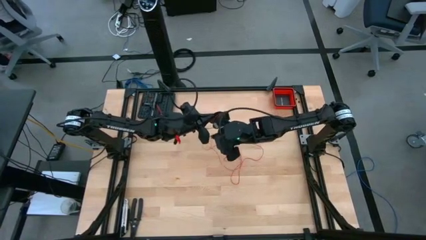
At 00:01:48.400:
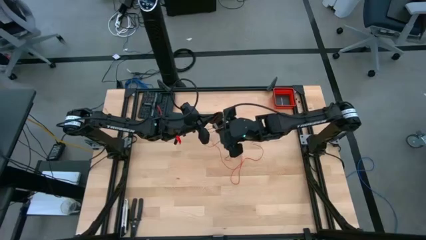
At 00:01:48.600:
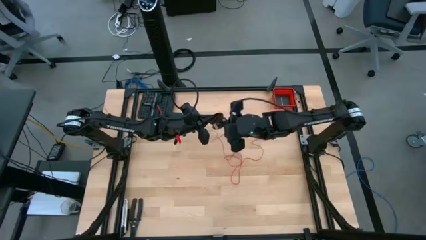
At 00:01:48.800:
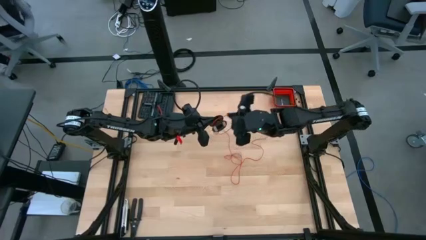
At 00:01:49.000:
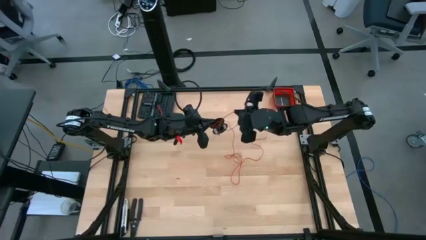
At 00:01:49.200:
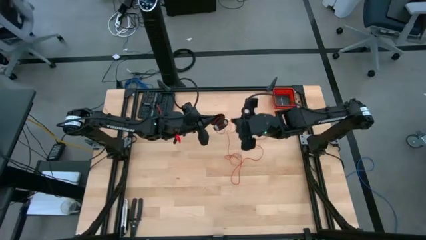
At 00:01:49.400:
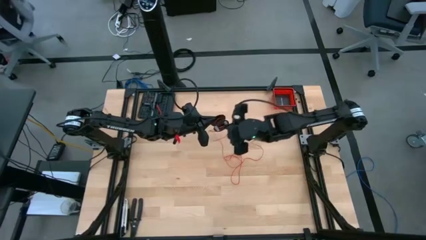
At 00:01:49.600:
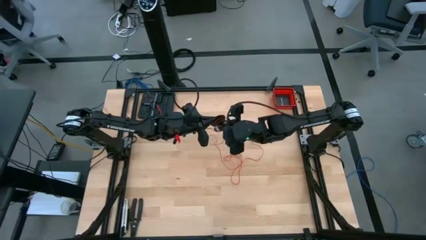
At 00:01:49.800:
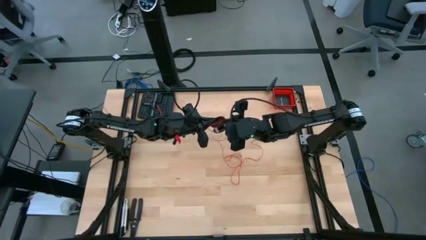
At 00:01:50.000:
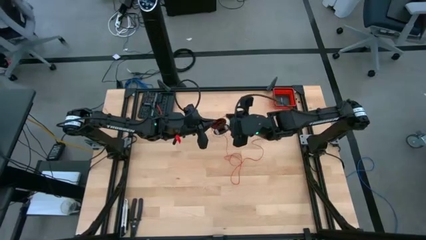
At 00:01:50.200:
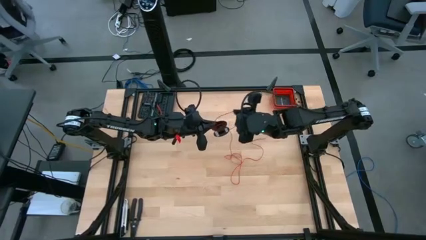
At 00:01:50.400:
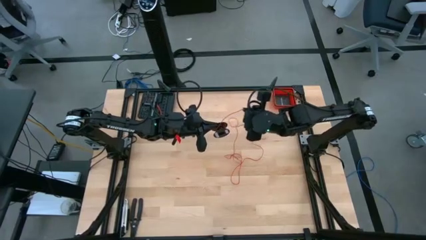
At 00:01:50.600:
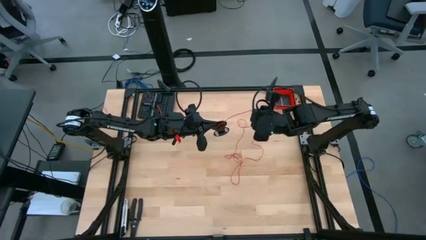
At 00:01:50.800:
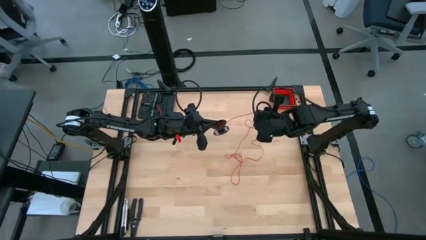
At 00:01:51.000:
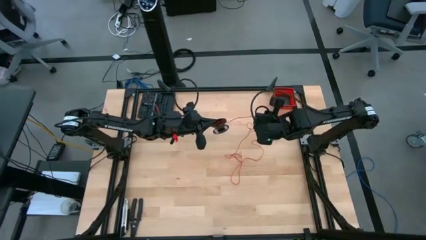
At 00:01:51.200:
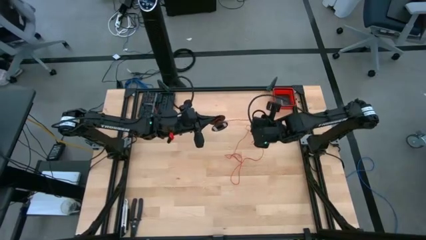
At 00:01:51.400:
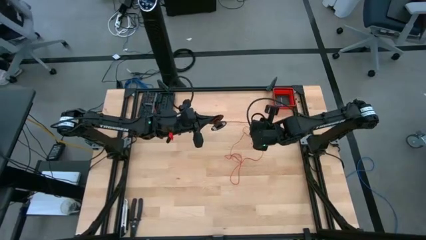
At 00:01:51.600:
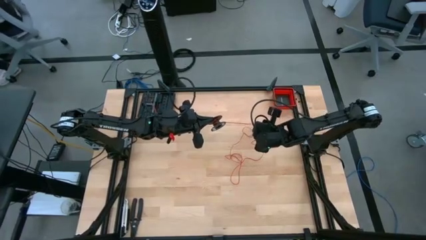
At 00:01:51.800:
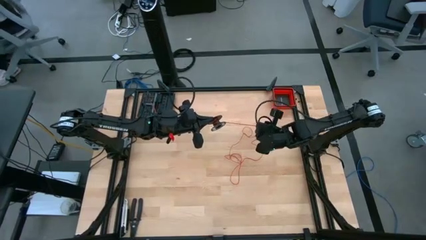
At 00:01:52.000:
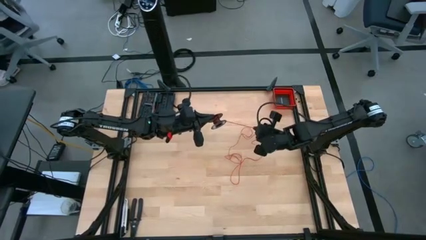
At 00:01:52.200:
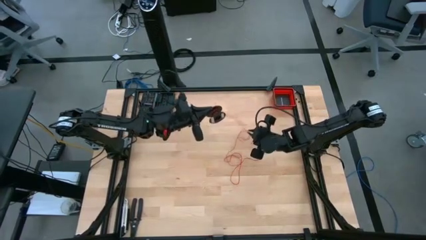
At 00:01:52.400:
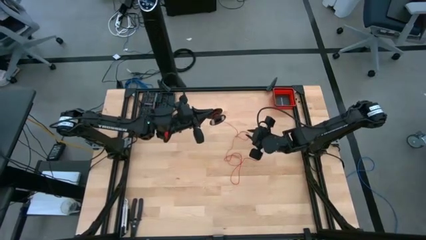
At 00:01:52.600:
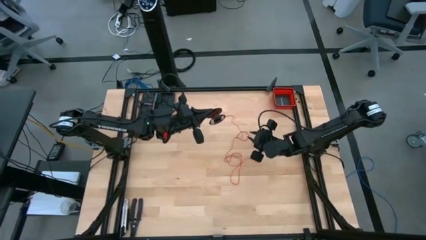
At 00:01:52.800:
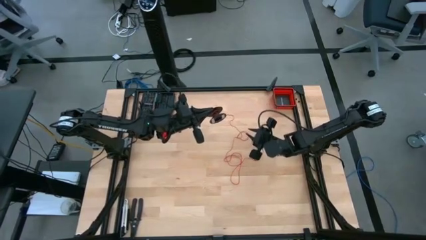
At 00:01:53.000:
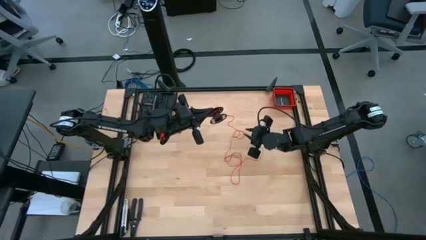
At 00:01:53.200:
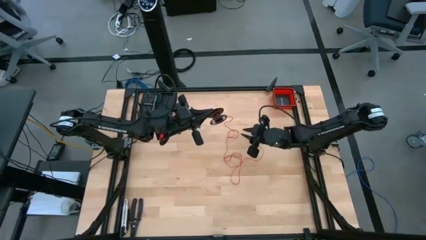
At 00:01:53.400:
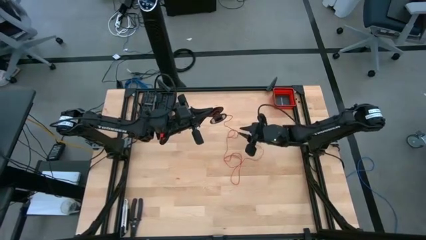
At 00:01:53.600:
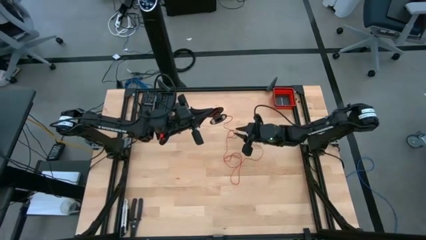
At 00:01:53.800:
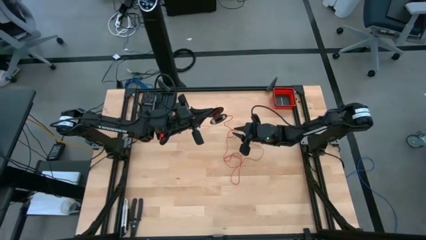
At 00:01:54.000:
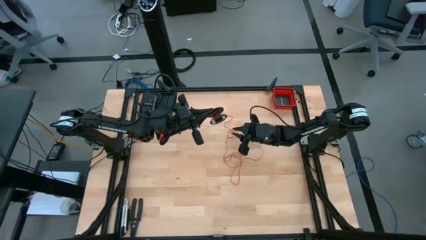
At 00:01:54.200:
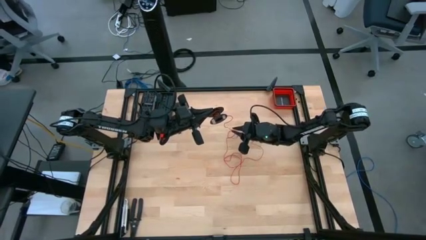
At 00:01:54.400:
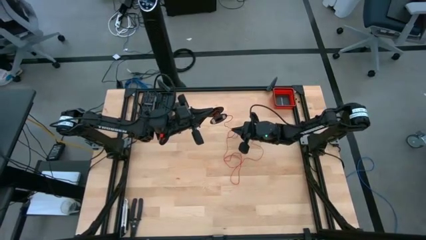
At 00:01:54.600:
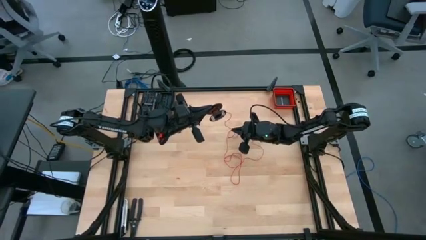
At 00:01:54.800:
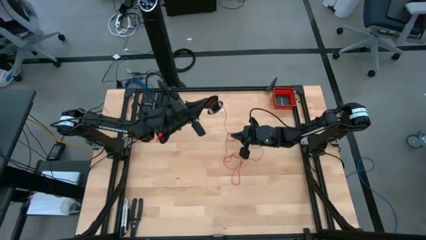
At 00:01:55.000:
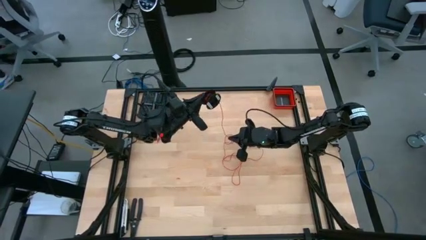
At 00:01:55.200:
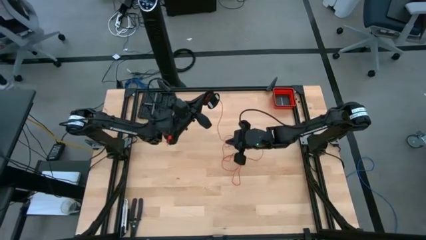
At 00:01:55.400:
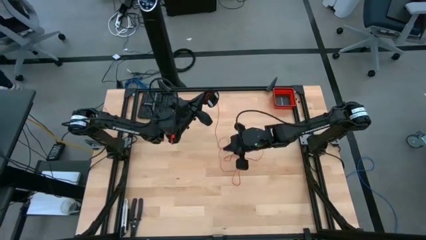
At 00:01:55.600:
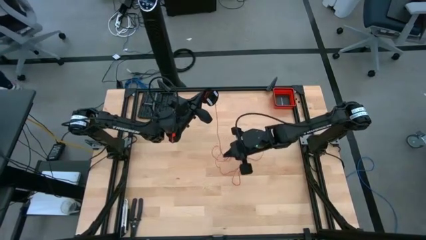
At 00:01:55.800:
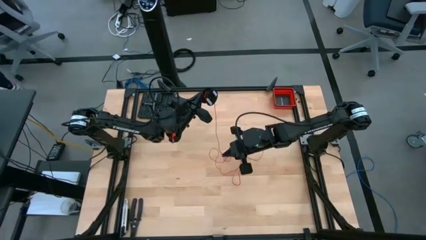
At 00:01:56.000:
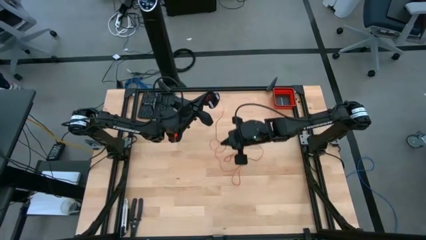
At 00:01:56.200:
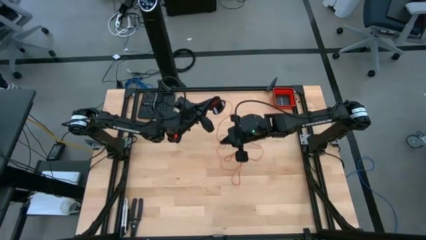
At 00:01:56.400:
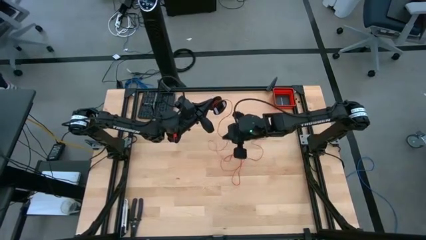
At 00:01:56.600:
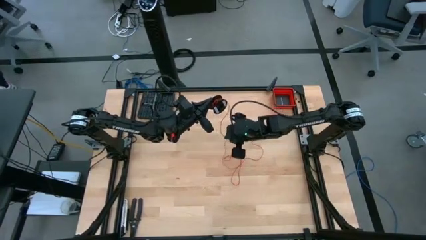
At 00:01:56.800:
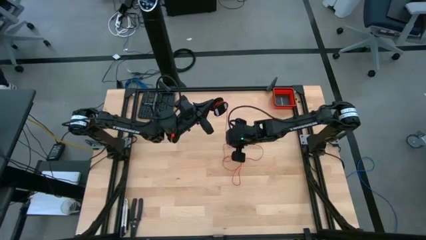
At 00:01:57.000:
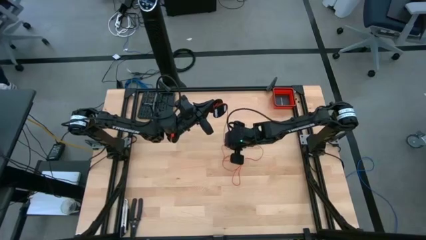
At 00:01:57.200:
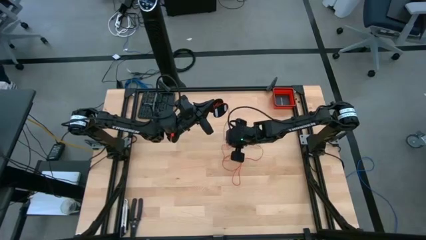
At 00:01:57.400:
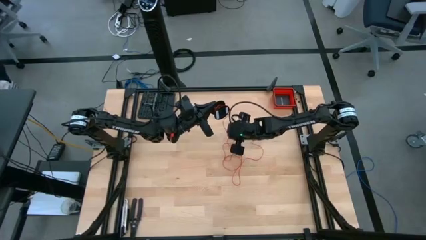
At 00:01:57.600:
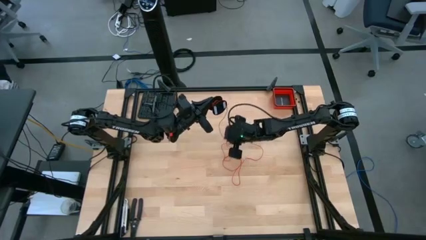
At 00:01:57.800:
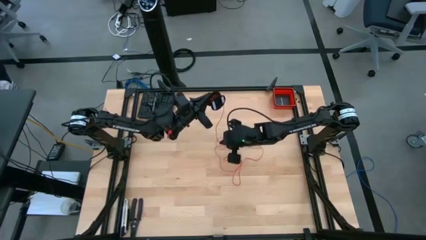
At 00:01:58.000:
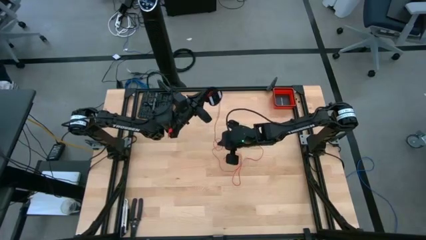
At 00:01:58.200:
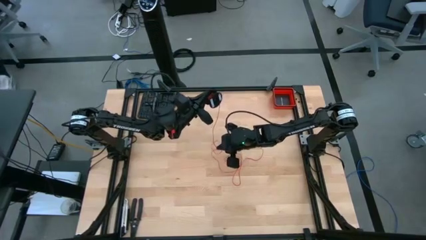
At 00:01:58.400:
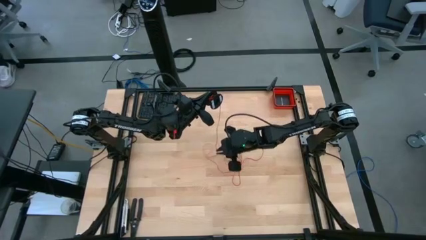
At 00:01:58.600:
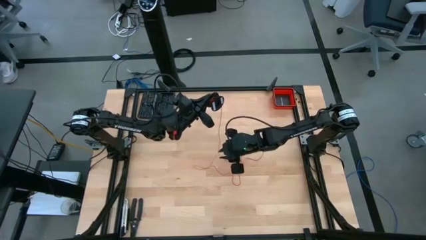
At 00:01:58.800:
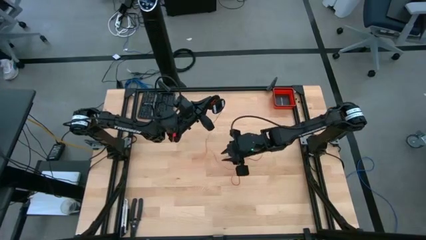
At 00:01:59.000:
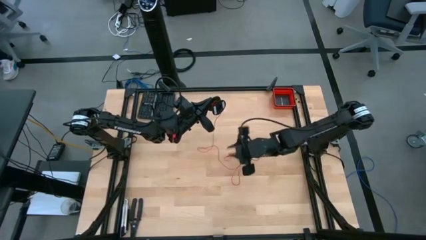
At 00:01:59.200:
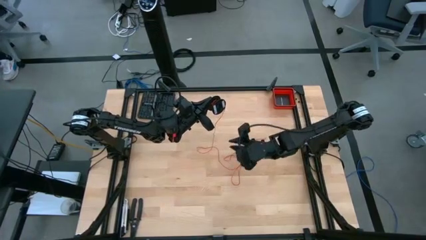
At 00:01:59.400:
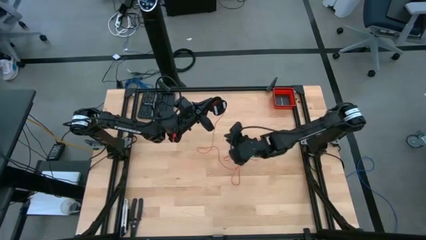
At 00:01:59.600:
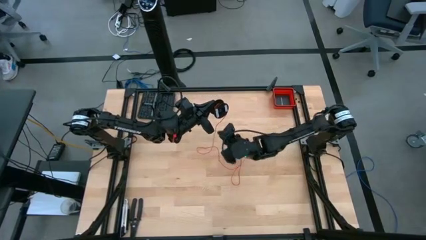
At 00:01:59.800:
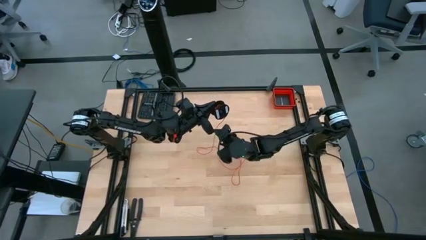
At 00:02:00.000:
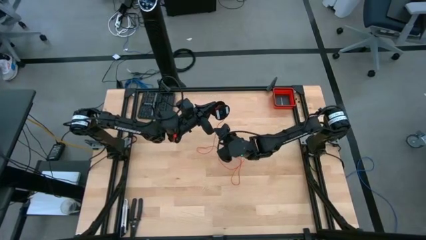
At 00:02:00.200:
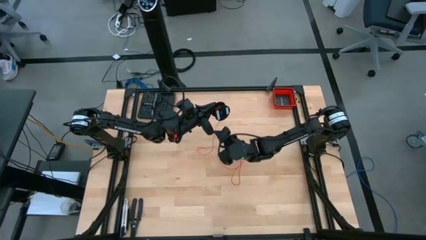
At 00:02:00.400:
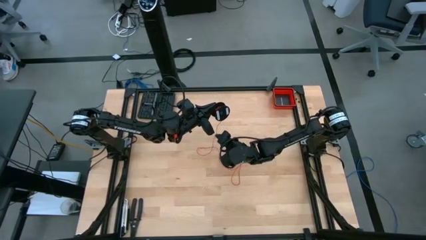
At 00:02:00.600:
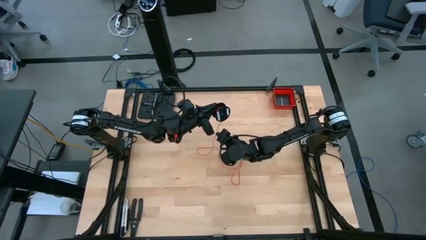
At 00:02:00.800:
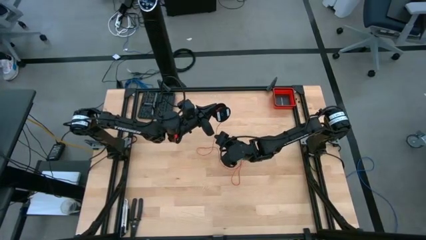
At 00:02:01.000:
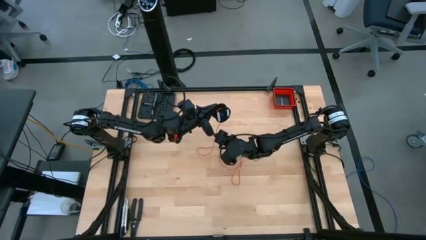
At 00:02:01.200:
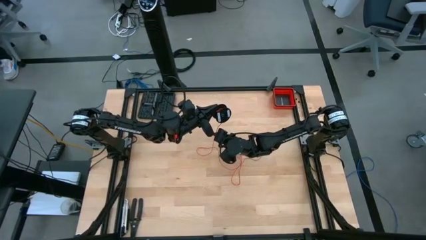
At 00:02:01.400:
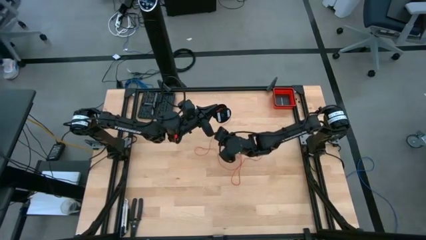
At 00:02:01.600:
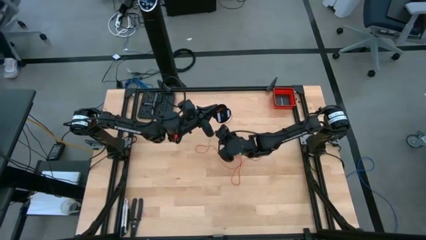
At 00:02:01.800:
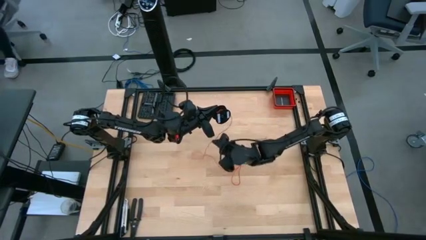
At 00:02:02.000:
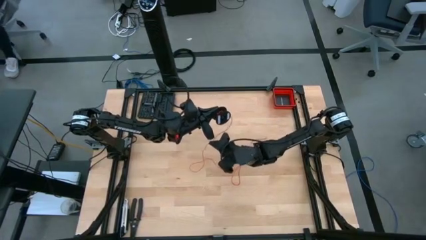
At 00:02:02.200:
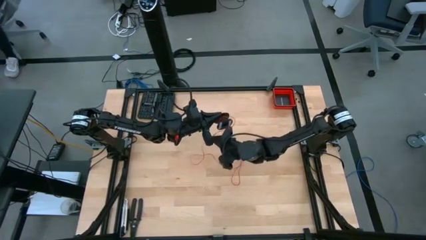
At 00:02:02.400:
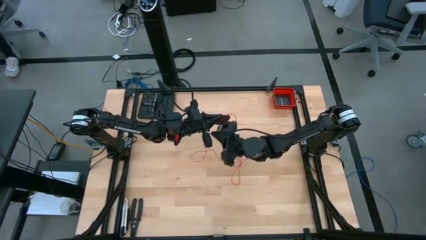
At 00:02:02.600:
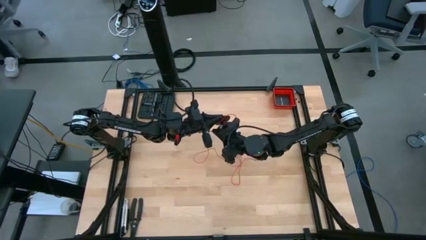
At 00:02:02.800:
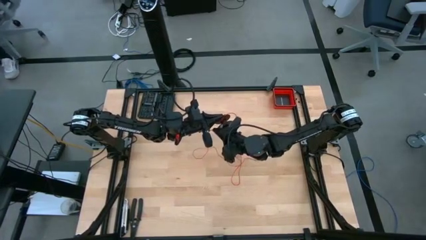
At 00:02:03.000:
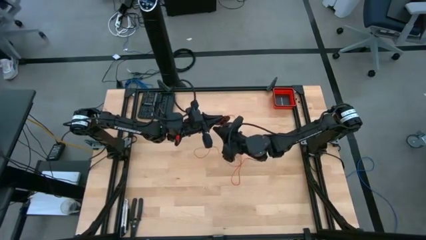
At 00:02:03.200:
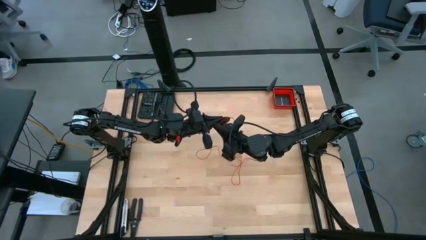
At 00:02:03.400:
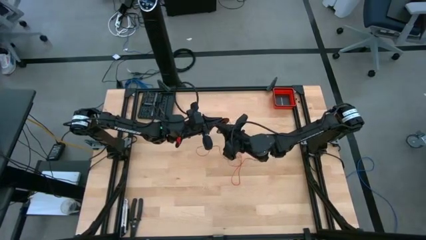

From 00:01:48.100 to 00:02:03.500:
Task: Coil cords
Coil the red wire on the black spool

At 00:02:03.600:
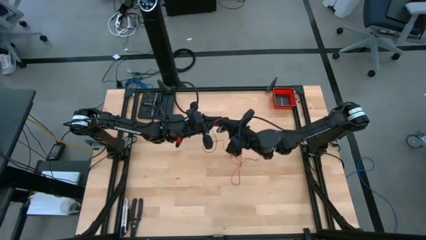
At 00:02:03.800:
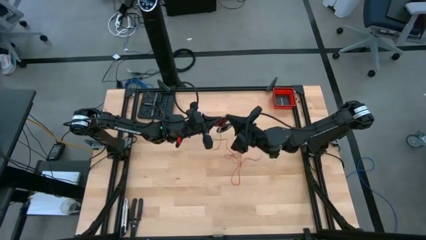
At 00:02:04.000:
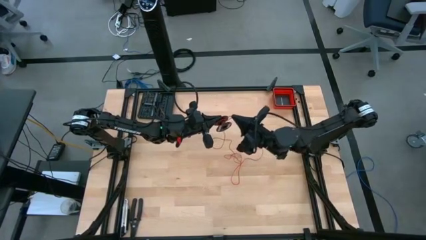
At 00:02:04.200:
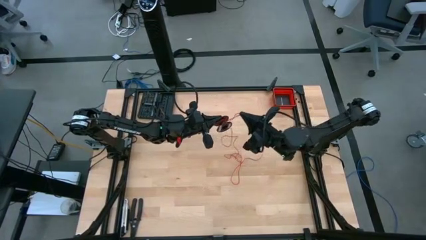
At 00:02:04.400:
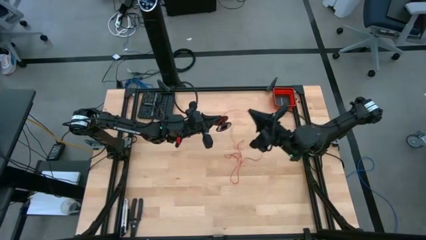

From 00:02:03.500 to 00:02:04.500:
Coil the red wire on the black spool
